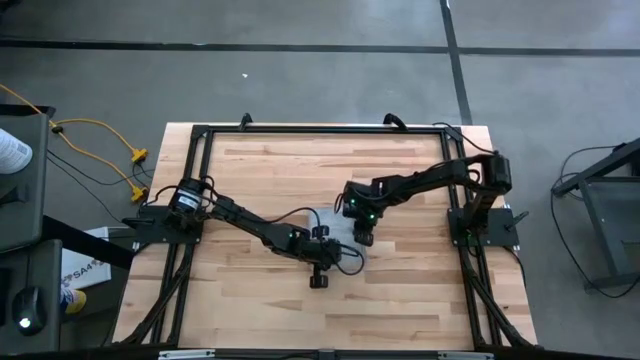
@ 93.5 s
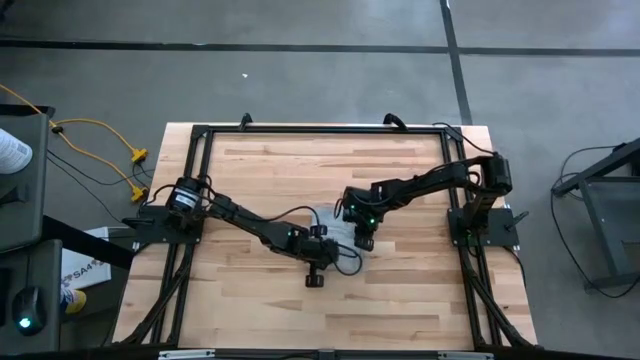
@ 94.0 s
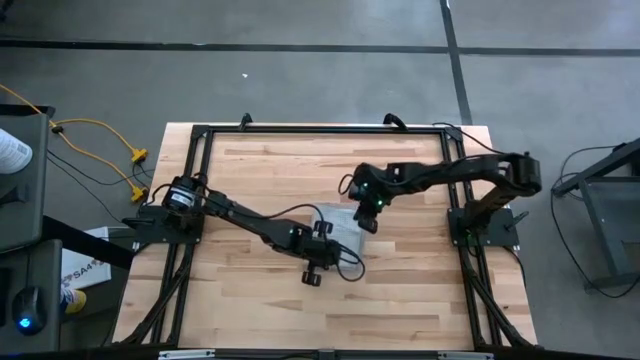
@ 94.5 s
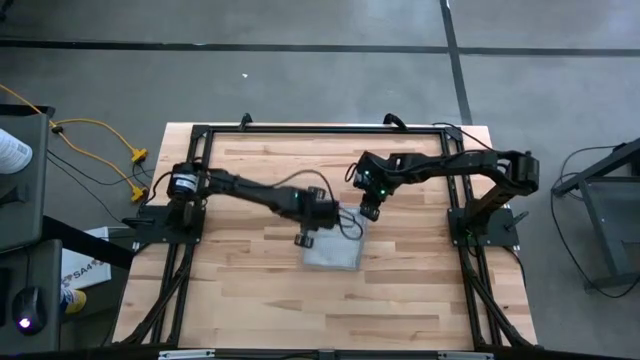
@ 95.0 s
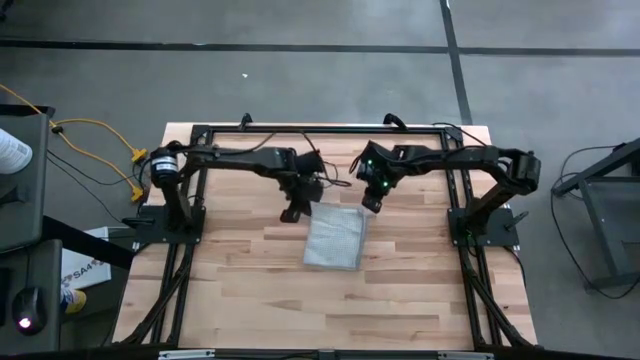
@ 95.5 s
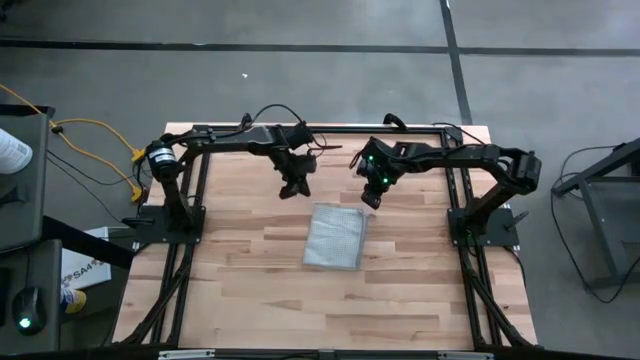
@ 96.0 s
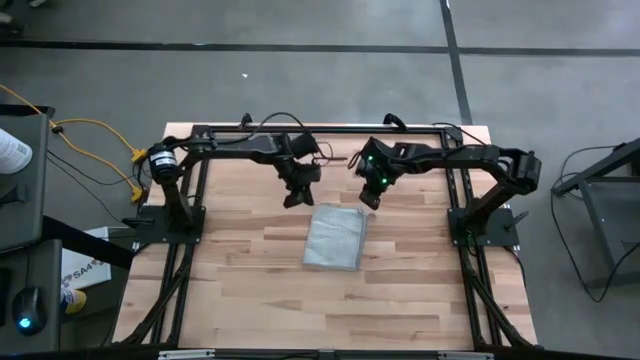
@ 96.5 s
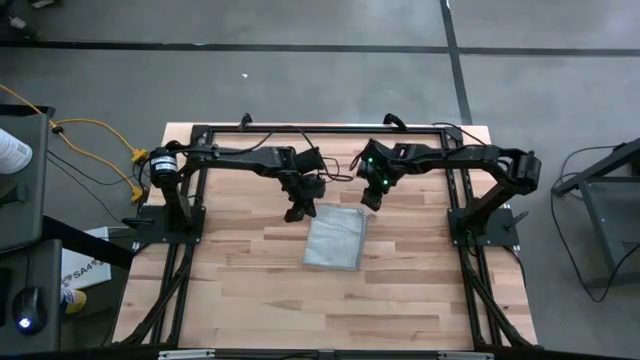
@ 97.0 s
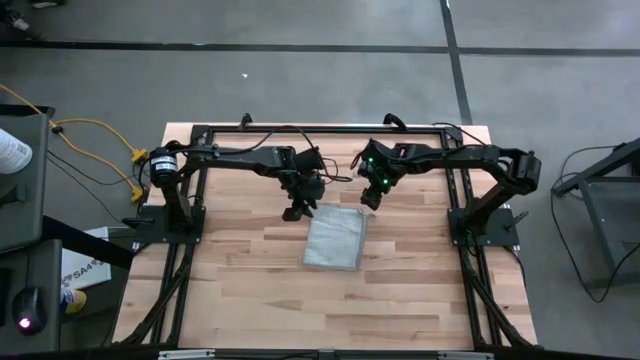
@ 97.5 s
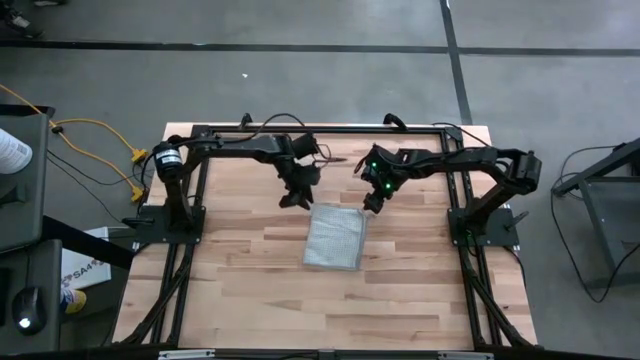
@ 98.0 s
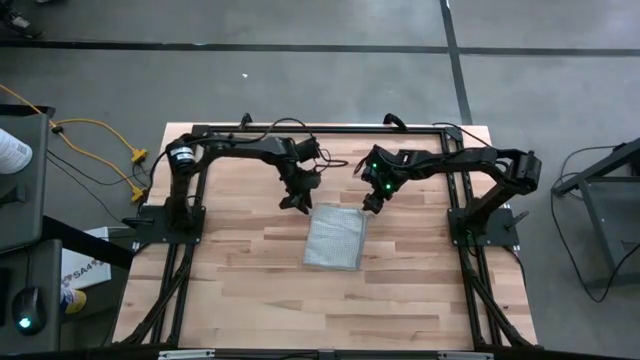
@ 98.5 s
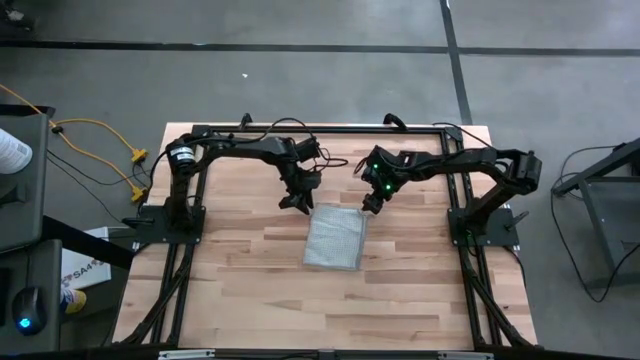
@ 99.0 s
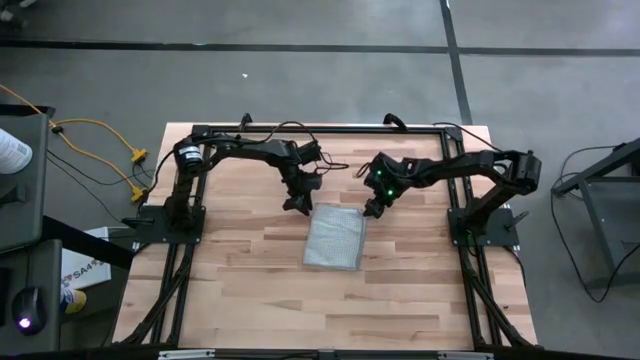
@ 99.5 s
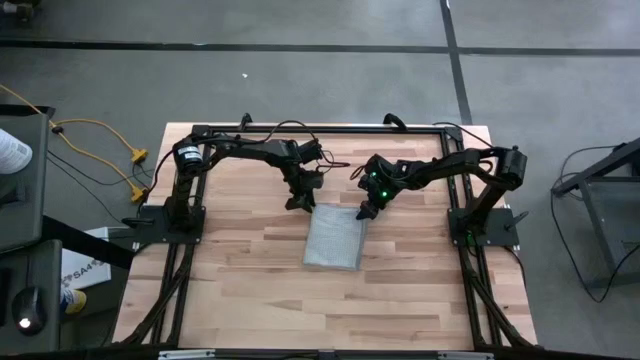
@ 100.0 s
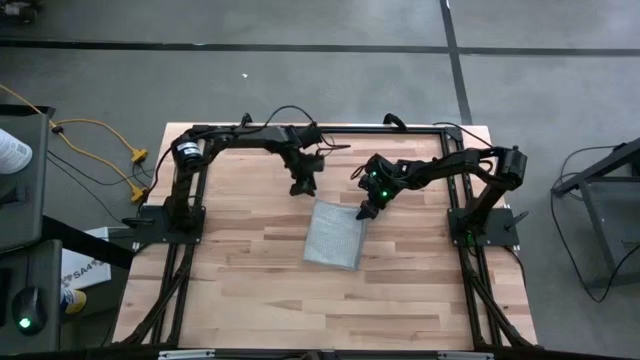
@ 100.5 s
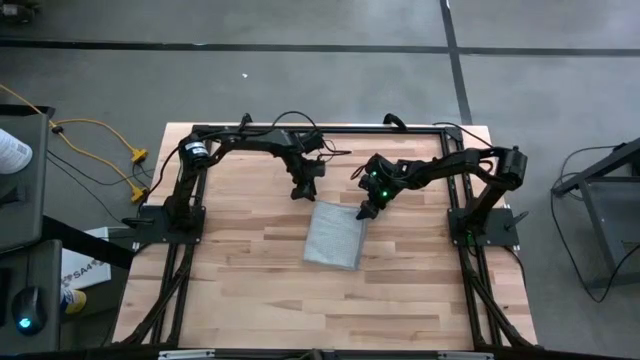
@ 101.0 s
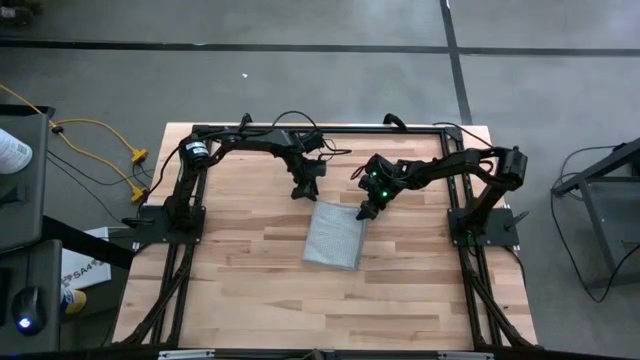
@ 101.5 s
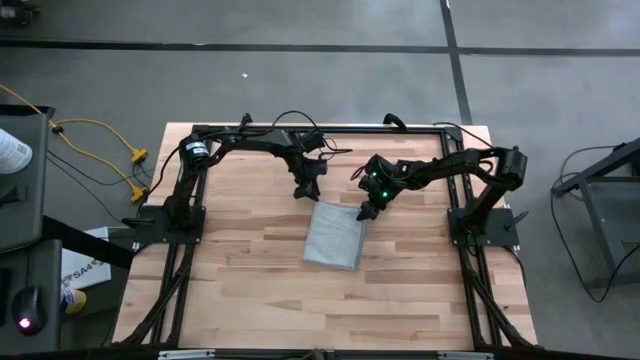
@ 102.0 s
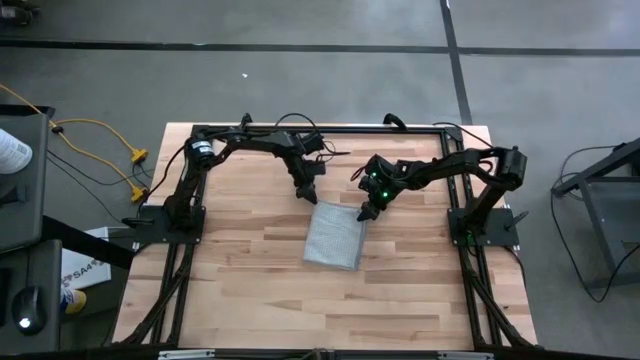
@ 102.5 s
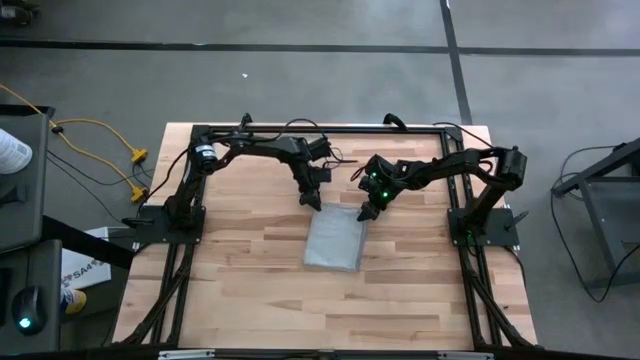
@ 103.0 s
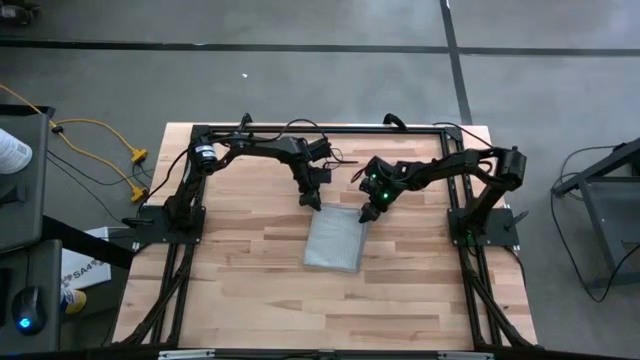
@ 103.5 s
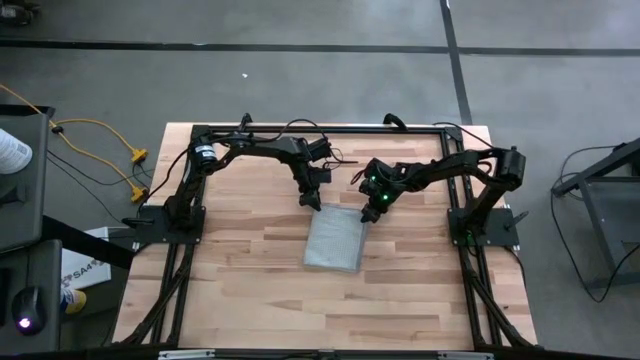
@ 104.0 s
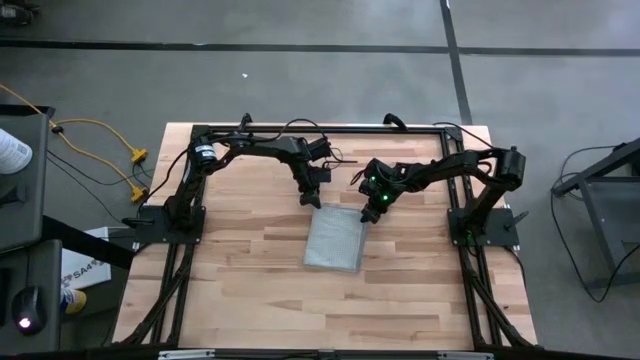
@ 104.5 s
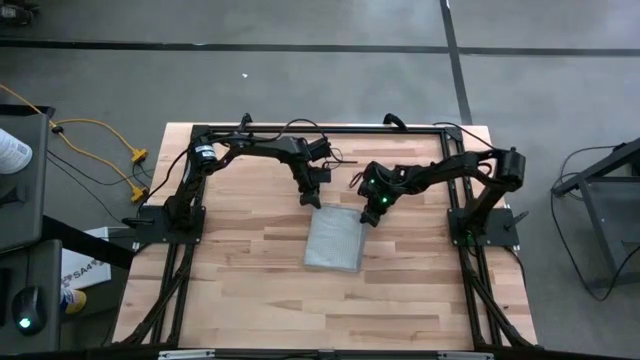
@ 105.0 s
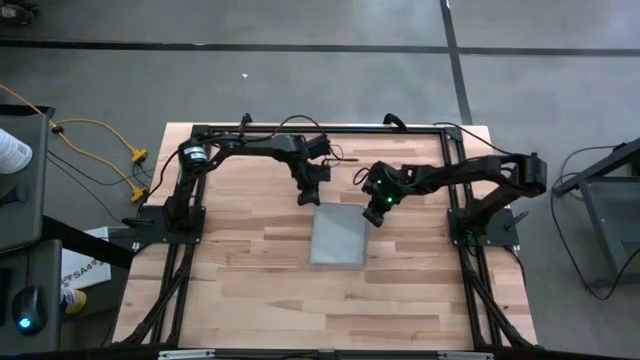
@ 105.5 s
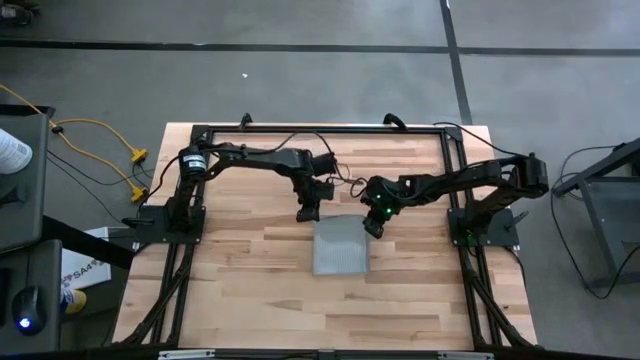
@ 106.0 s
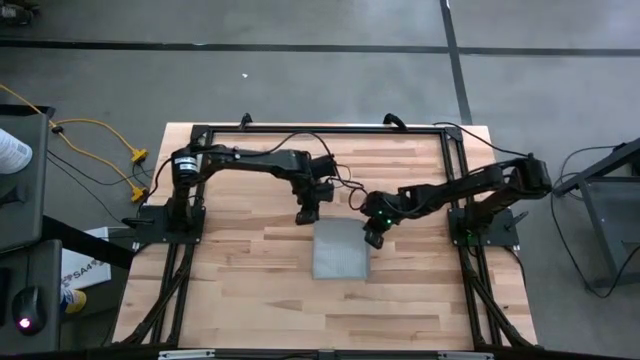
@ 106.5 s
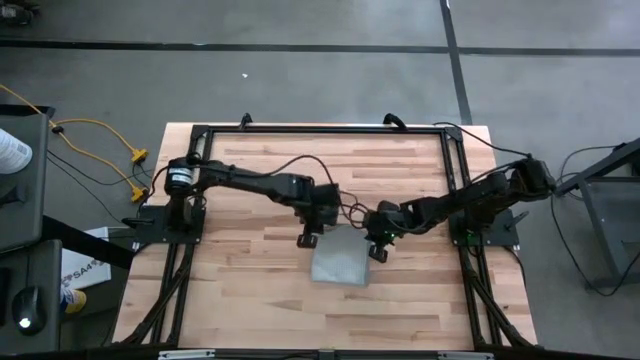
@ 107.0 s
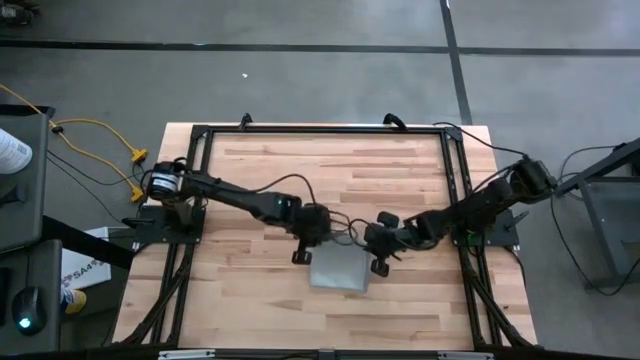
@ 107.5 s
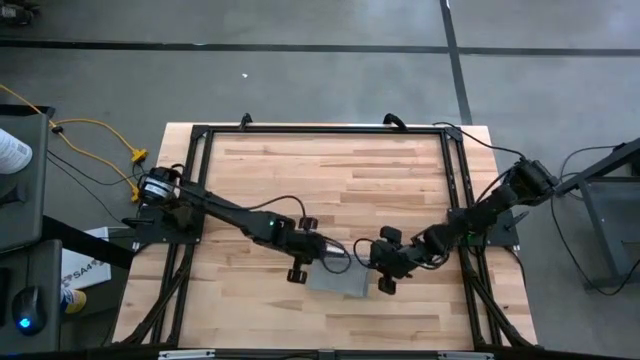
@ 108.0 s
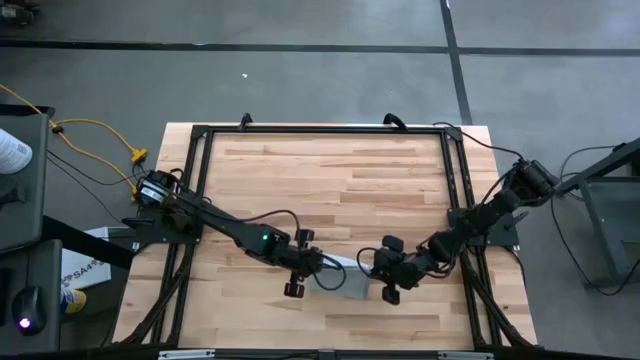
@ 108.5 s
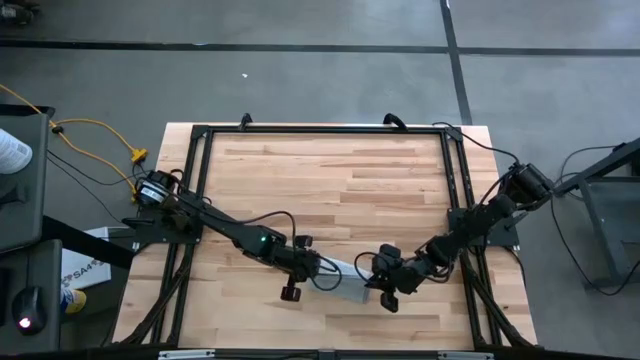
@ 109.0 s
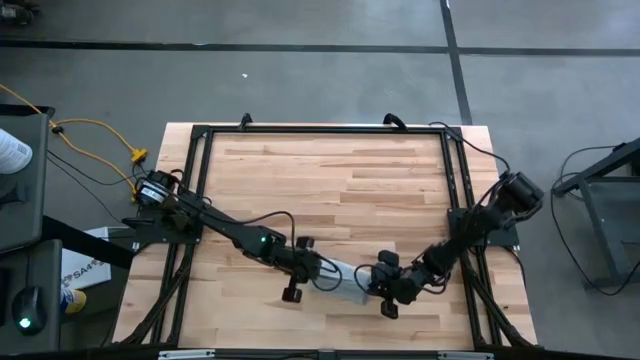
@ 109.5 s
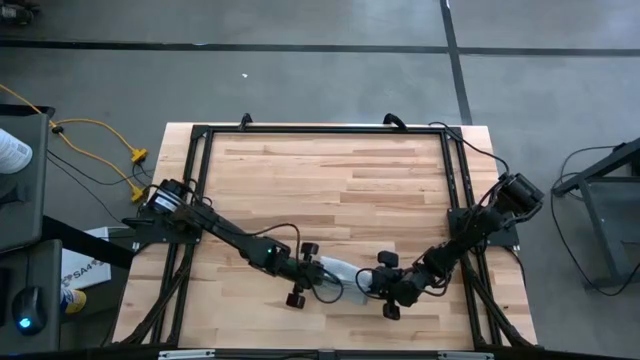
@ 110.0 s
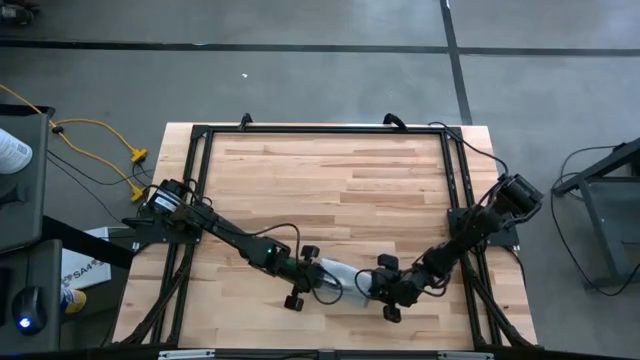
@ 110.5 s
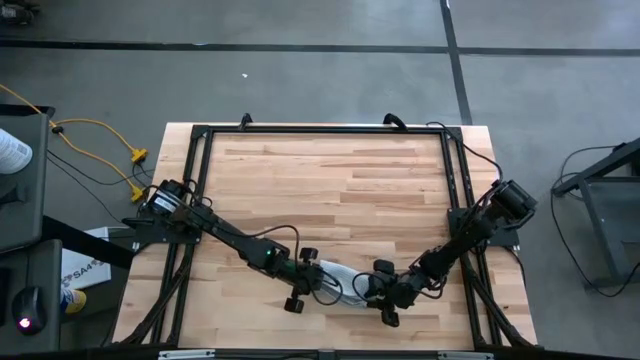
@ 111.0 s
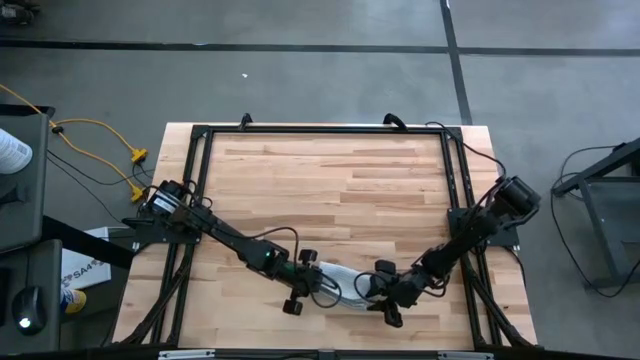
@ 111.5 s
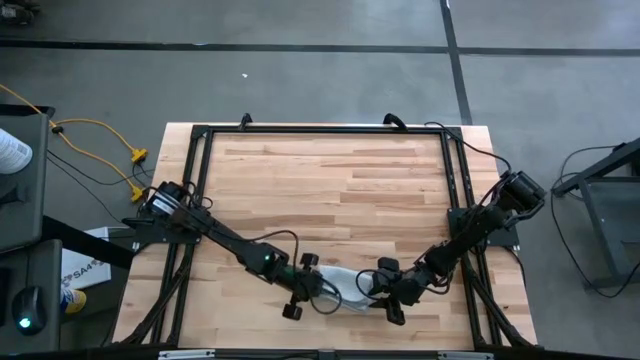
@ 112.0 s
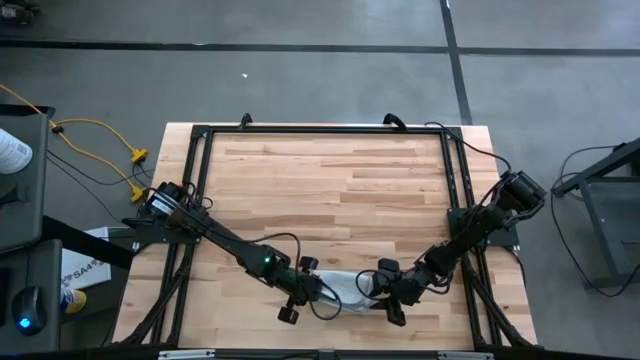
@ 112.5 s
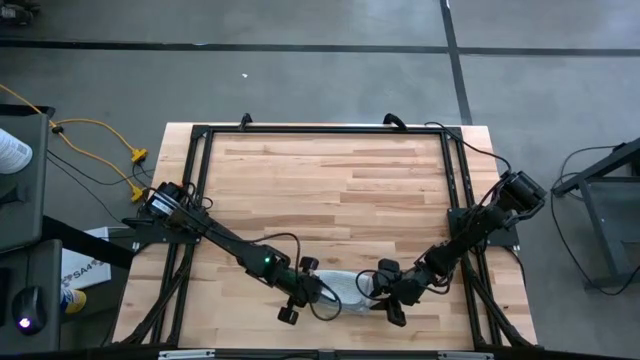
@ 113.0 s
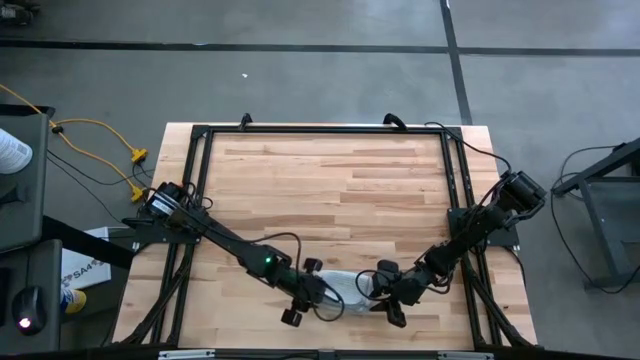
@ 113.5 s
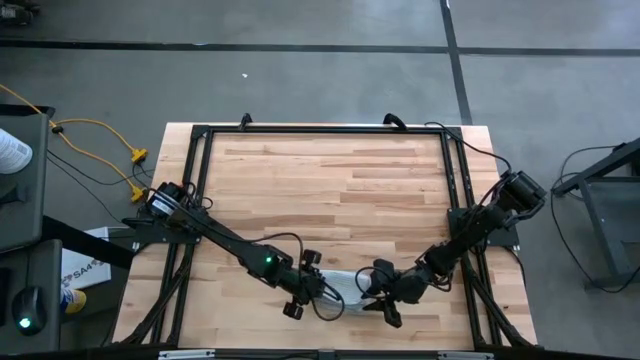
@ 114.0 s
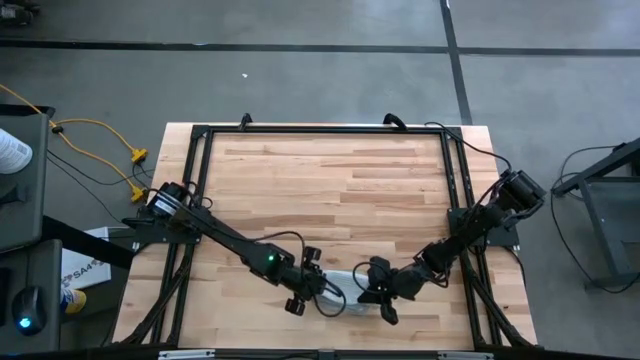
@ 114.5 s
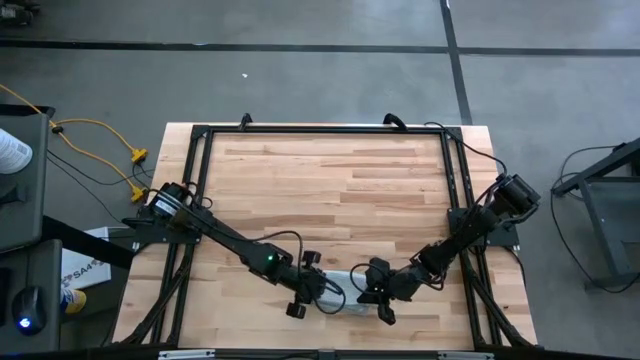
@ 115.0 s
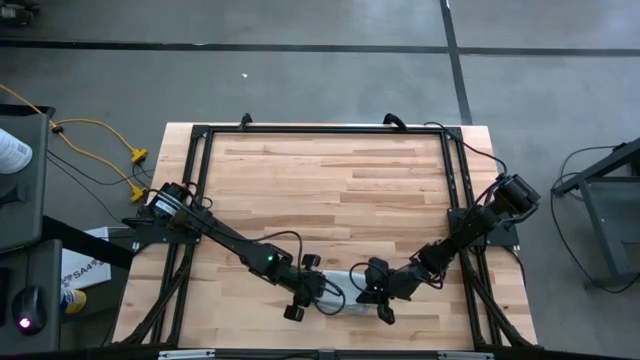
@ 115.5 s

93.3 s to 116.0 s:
Task: Fold microfiber towels
Fold the gray towel on the table
